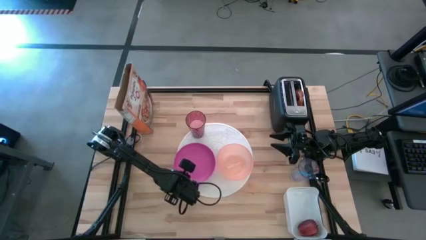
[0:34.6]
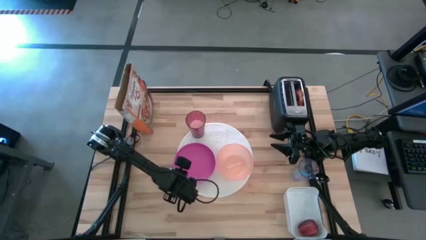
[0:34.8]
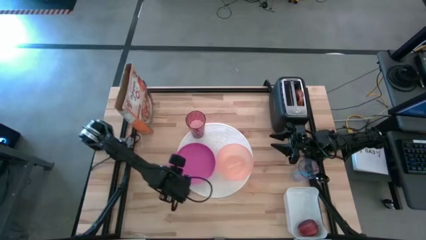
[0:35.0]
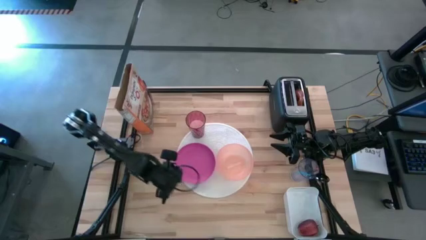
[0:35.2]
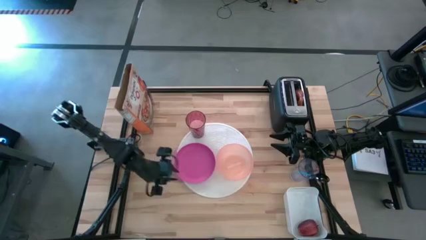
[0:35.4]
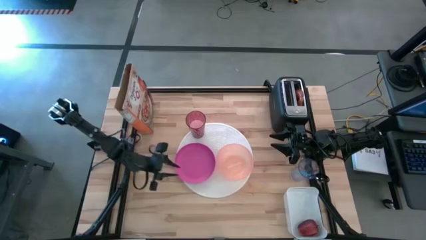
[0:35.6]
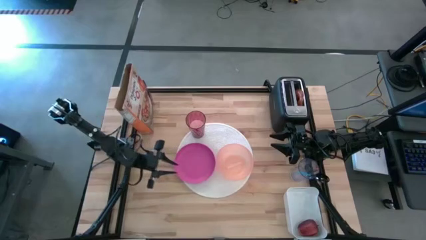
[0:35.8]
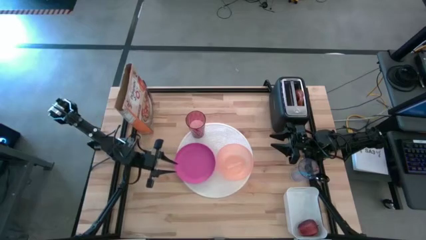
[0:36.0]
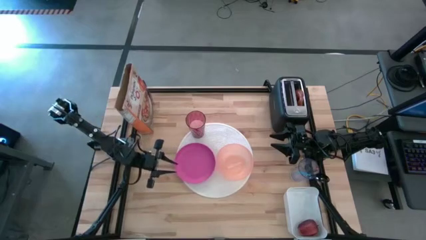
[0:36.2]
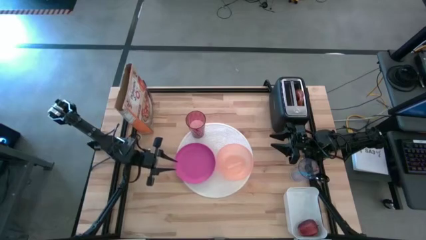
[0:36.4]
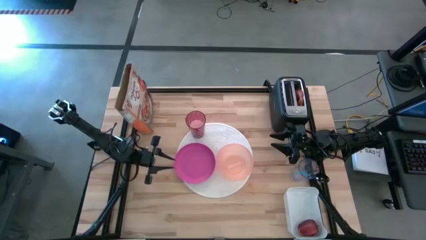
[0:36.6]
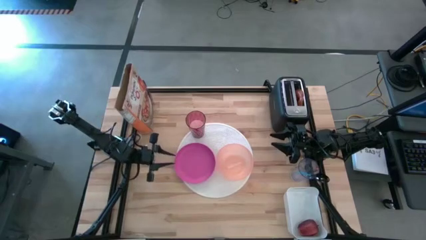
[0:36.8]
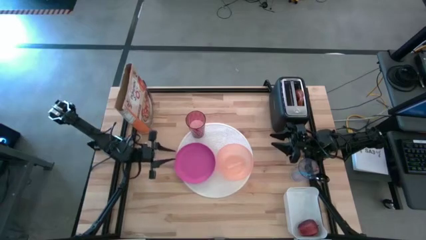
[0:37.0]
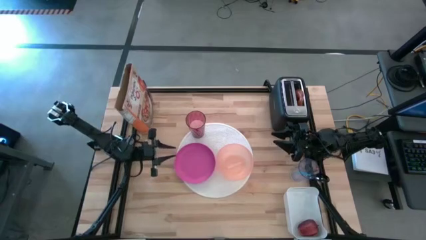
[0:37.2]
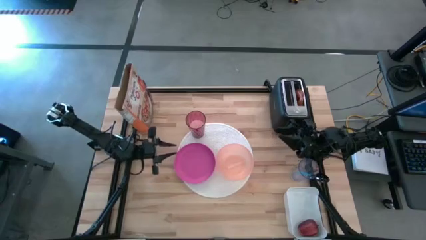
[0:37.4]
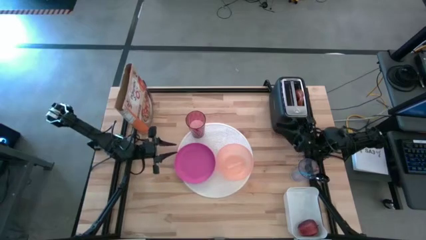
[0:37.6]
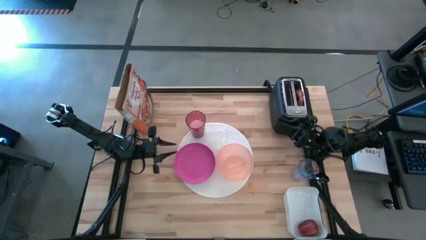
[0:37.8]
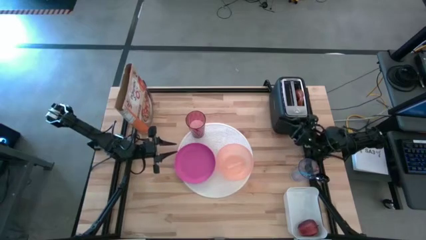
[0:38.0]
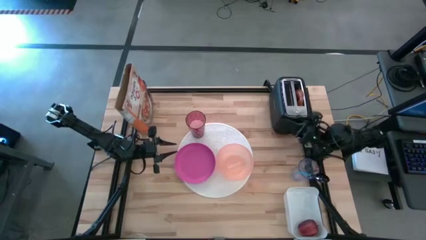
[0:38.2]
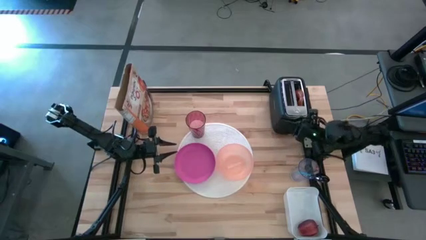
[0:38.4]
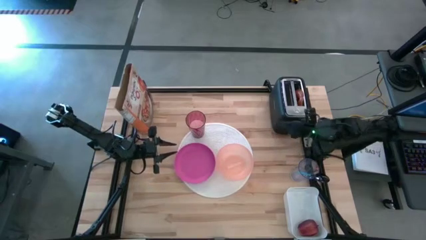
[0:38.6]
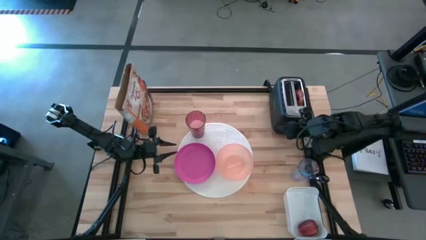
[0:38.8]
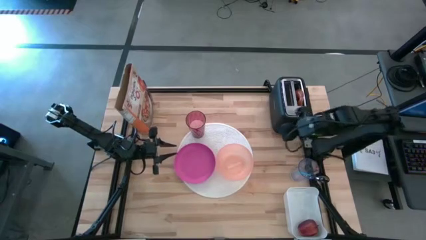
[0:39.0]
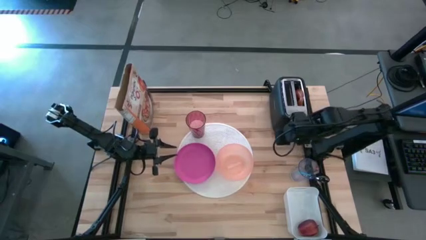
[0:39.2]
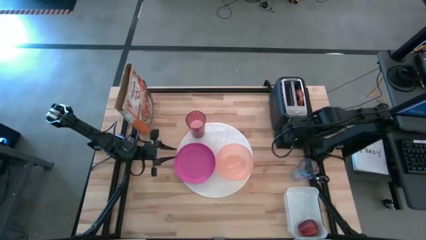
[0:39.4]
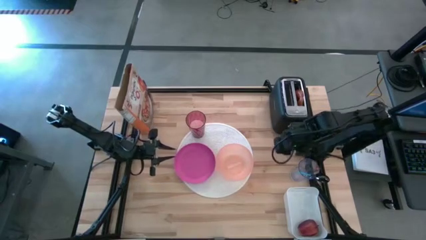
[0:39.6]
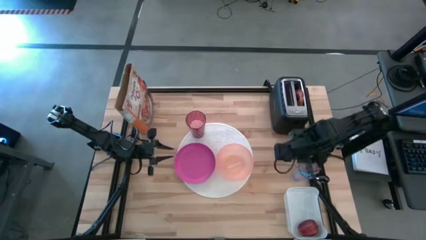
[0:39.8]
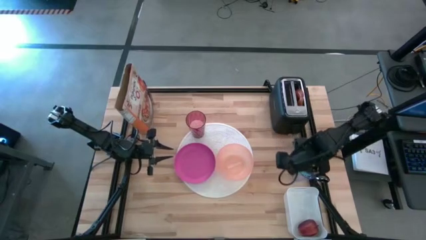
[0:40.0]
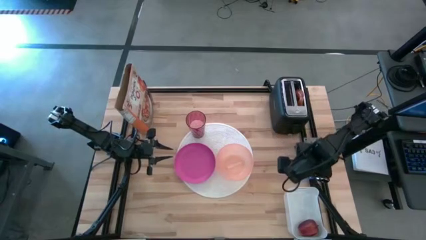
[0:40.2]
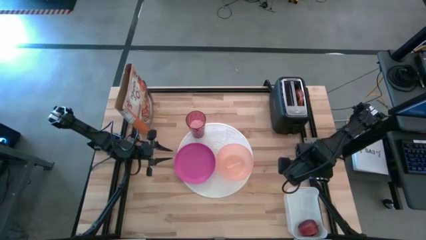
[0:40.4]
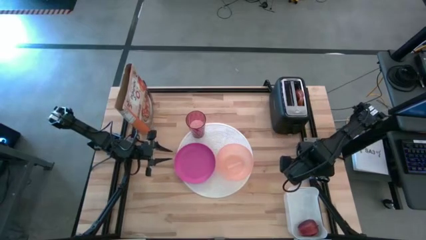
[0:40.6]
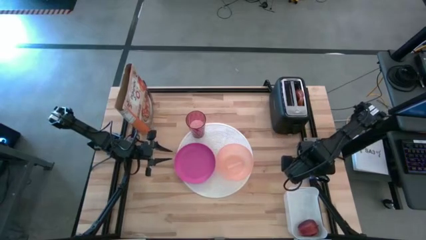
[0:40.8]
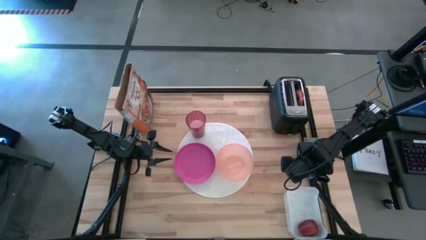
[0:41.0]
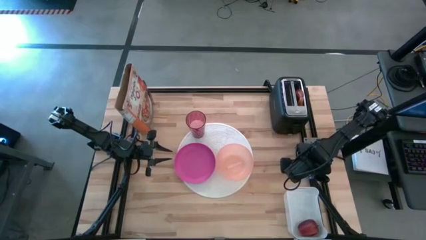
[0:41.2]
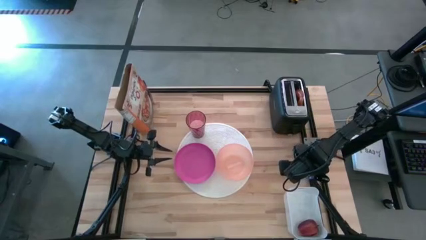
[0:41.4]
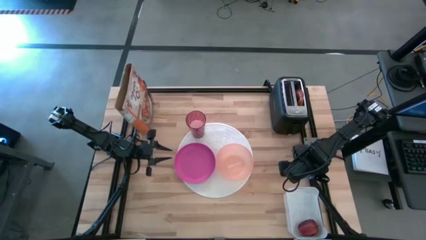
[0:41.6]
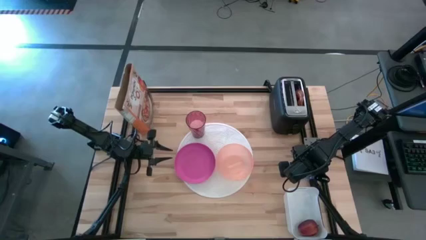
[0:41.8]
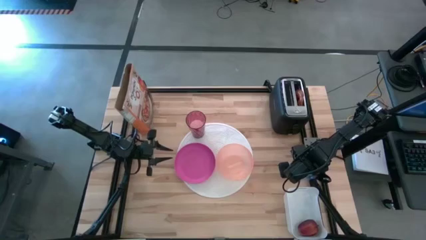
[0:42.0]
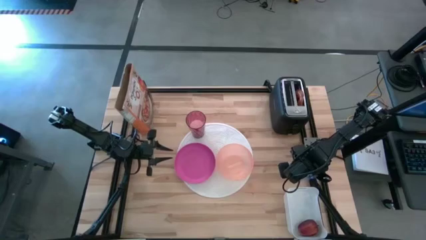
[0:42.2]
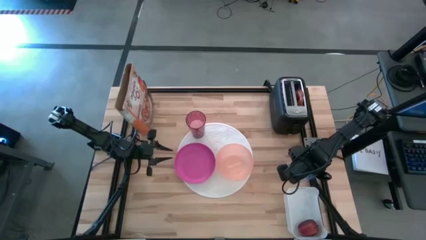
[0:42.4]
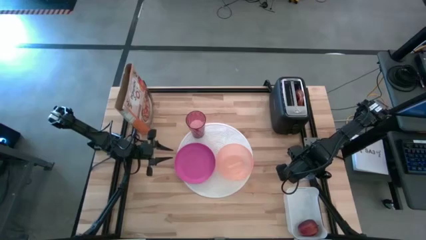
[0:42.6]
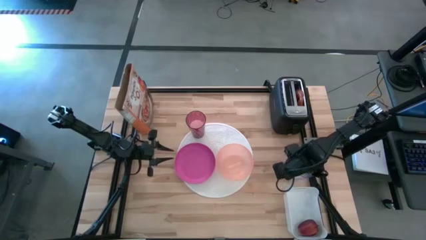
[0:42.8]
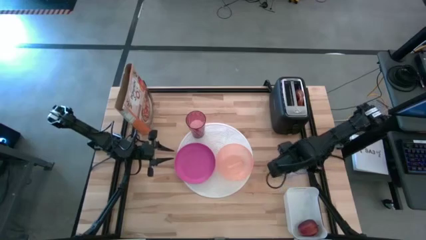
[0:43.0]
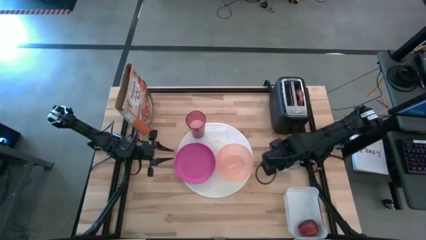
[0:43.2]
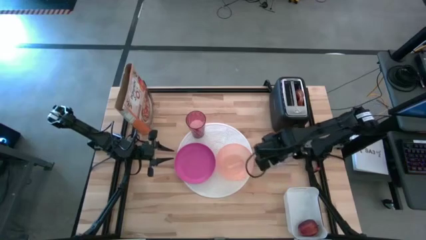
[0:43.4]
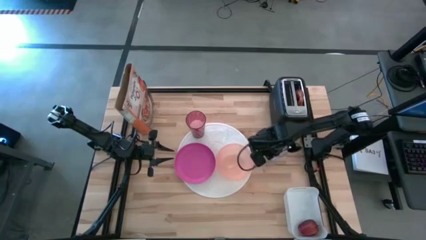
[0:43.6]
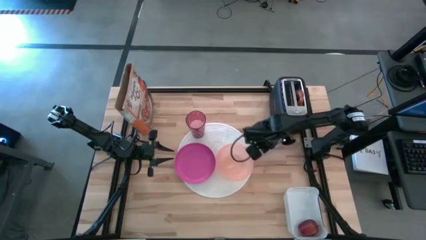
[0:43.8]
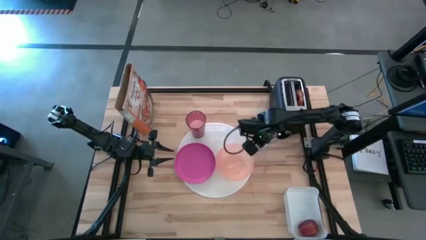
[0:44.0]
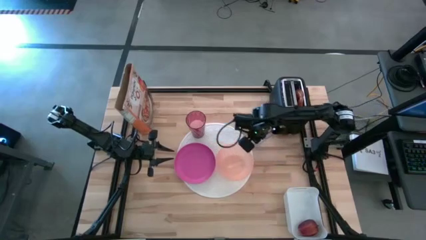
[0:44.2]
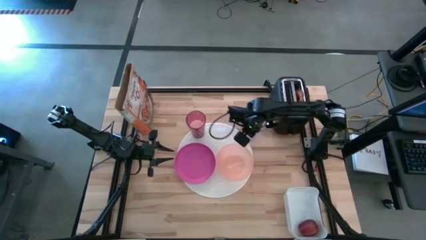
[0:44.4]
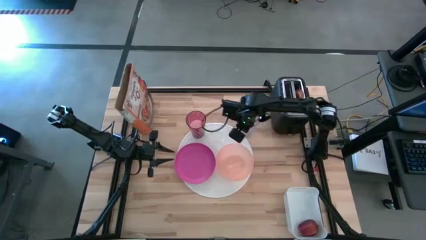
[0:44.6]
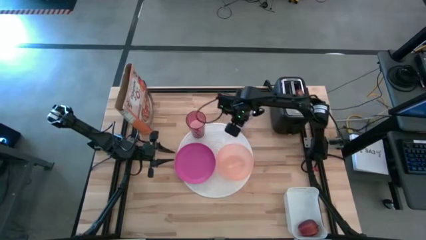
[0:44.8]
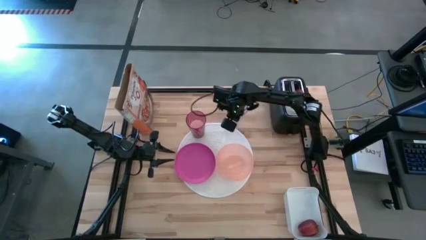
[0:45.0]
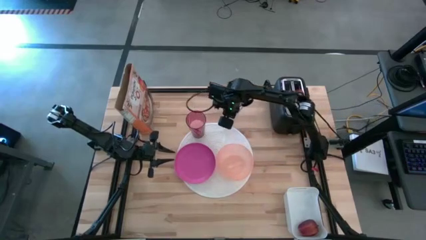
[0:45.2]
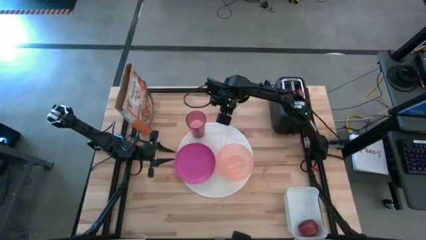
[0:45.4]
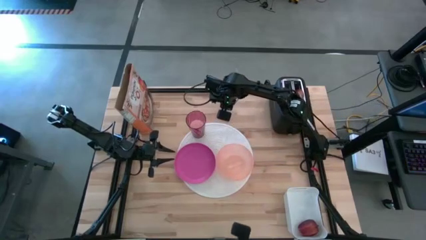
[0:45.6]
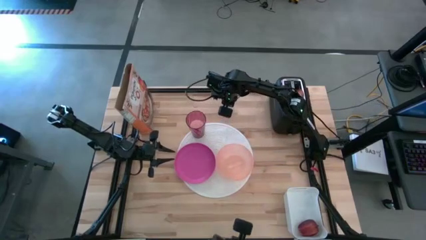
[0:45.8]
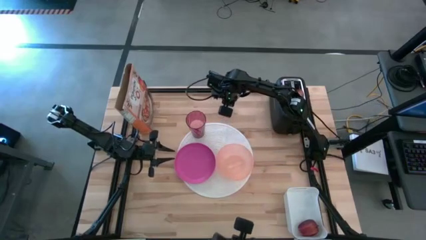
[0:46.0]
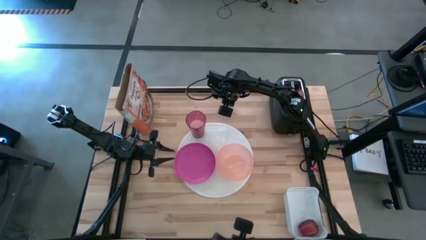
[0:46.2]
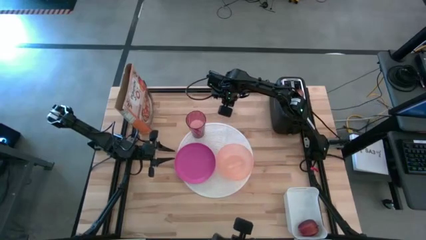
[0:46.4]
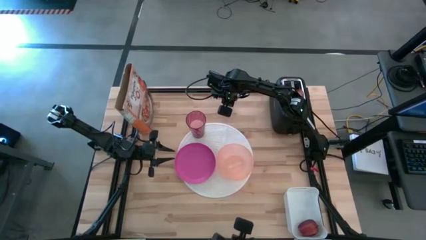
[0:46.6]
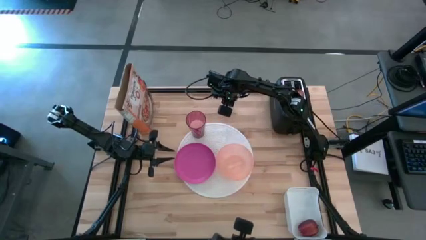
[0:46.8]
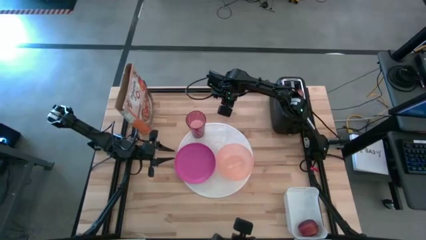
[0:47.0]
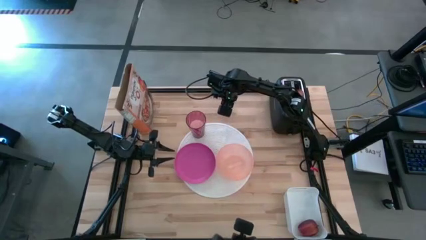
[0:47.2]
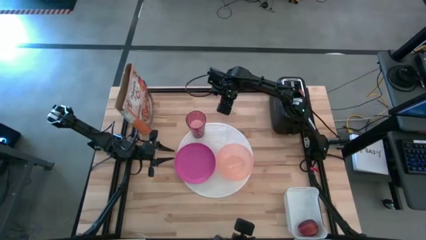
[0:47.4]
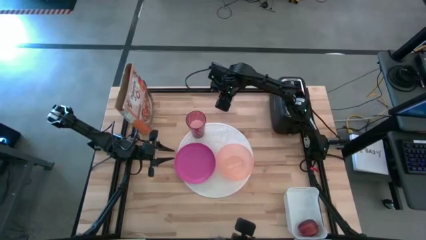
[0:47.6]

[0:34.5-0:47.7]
Task: Arrange a breakfast setting
Move the transparent glass cup on the top of the white mat
